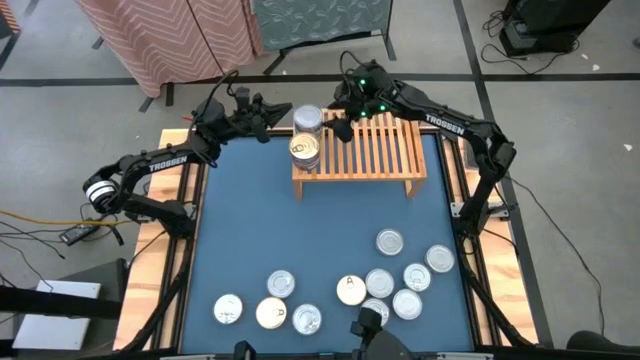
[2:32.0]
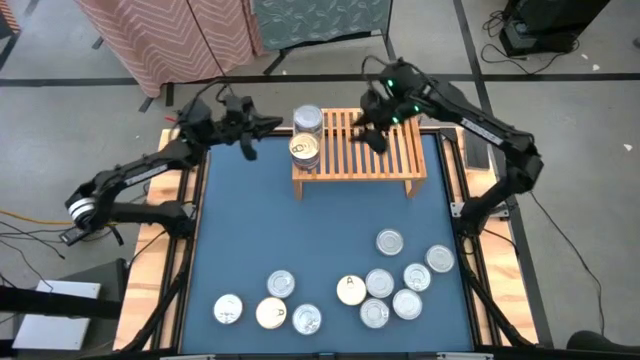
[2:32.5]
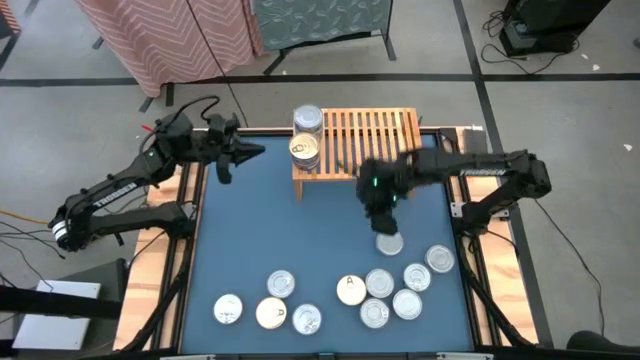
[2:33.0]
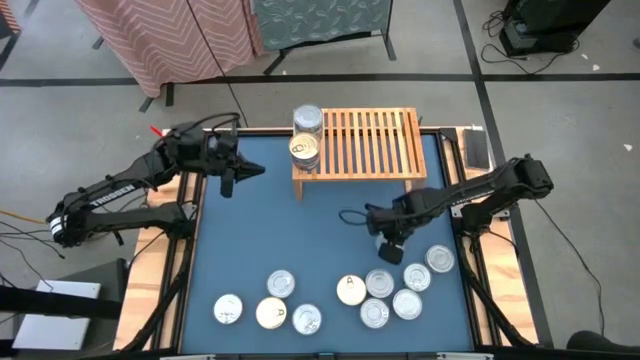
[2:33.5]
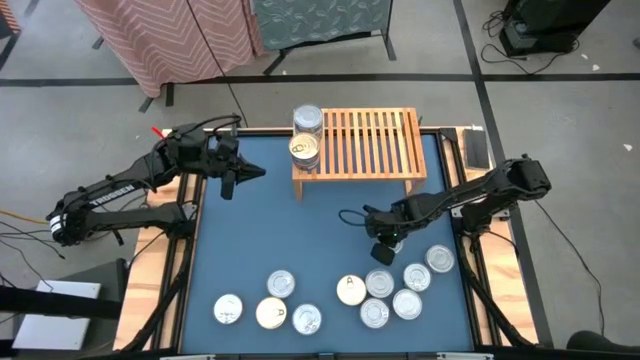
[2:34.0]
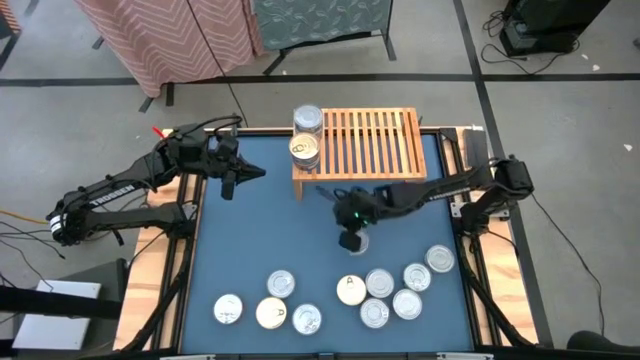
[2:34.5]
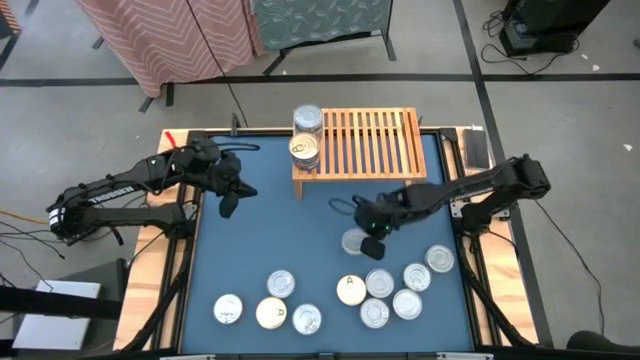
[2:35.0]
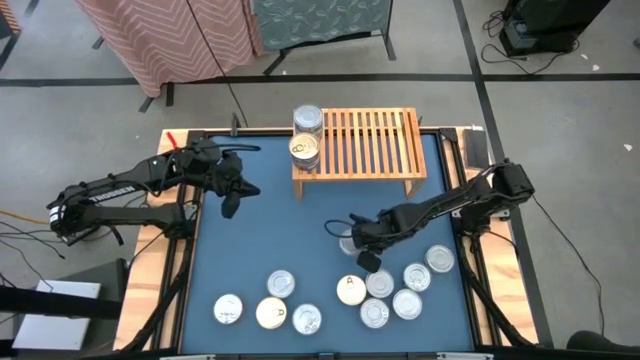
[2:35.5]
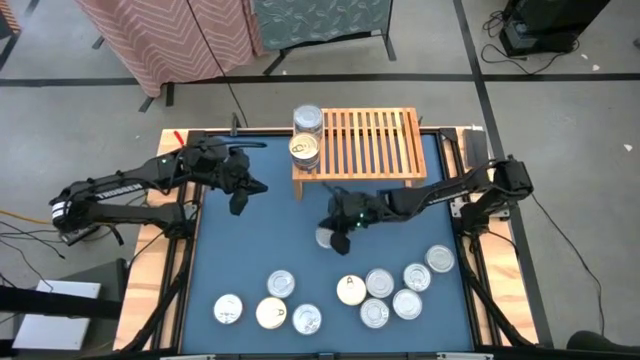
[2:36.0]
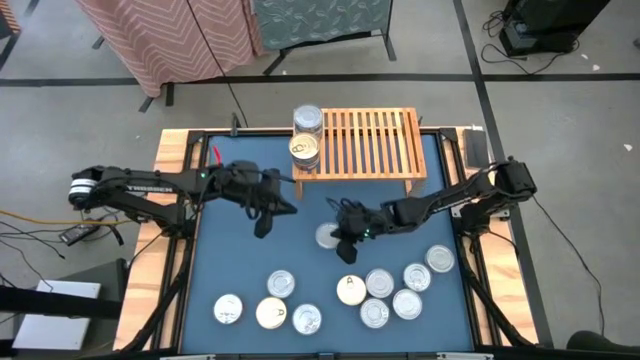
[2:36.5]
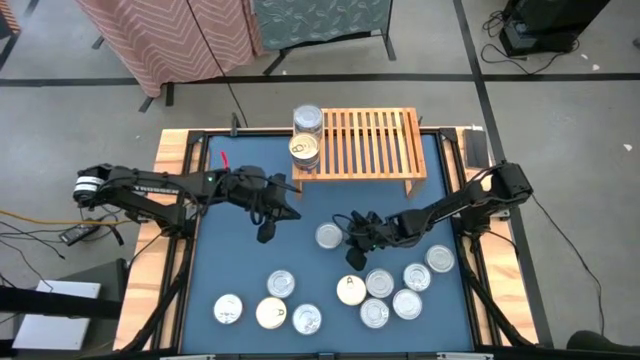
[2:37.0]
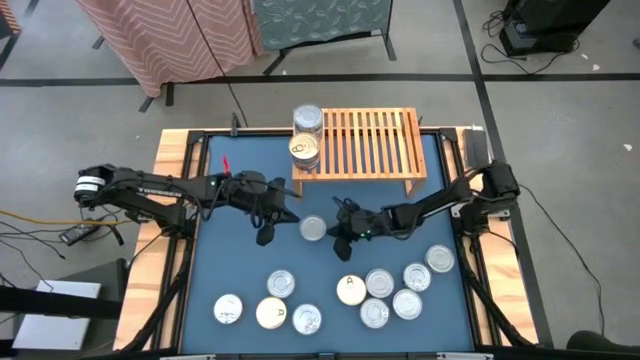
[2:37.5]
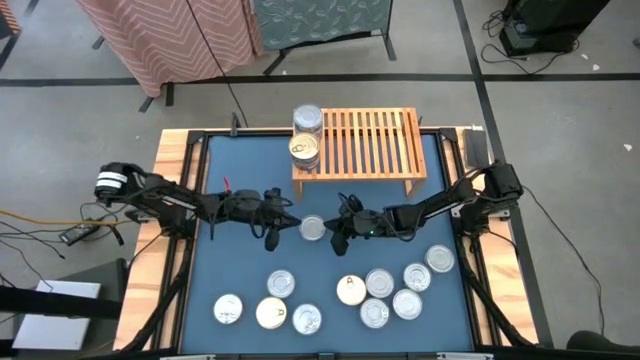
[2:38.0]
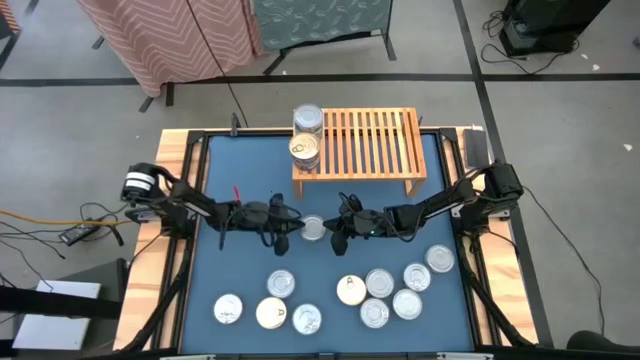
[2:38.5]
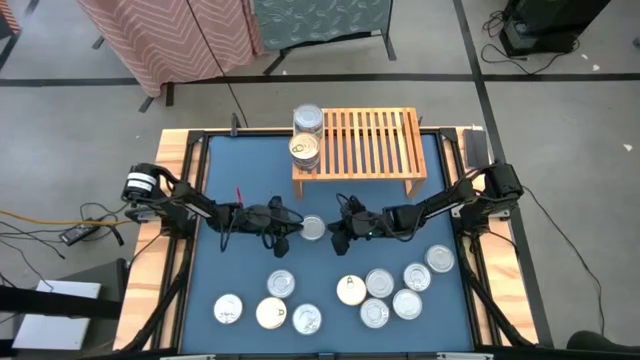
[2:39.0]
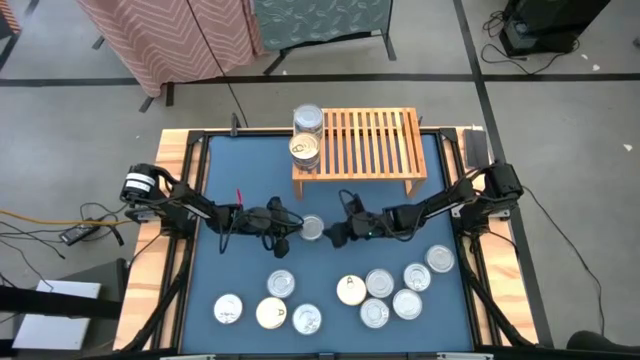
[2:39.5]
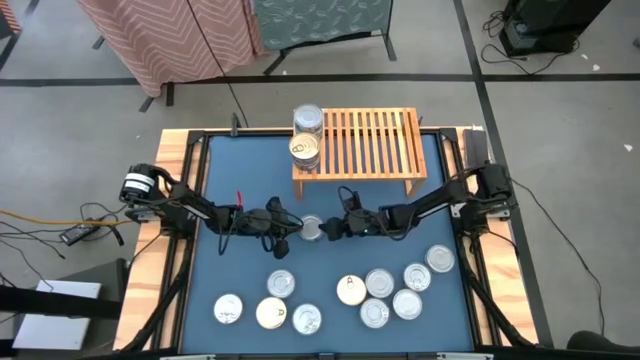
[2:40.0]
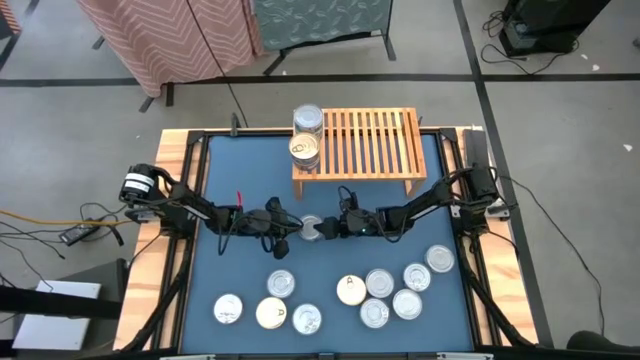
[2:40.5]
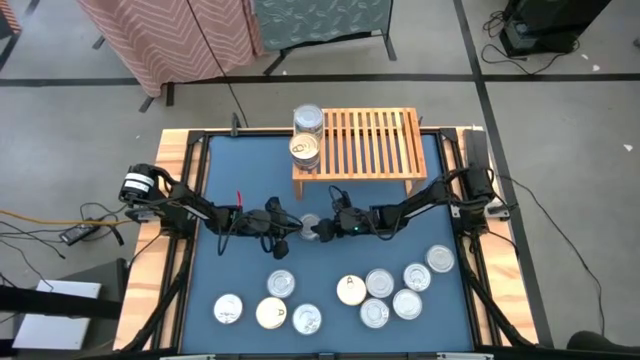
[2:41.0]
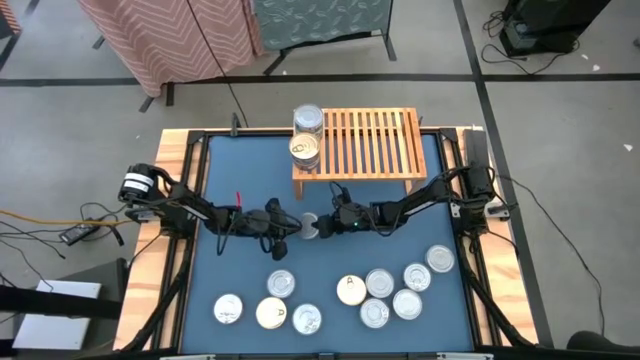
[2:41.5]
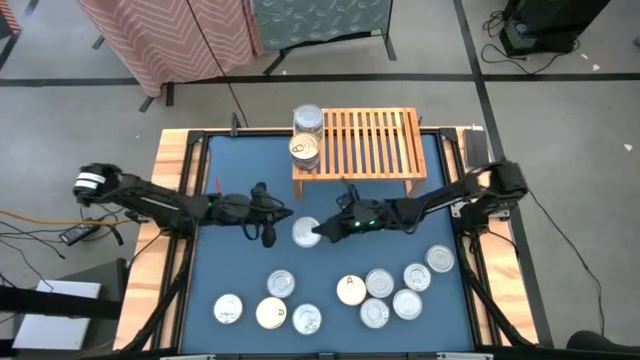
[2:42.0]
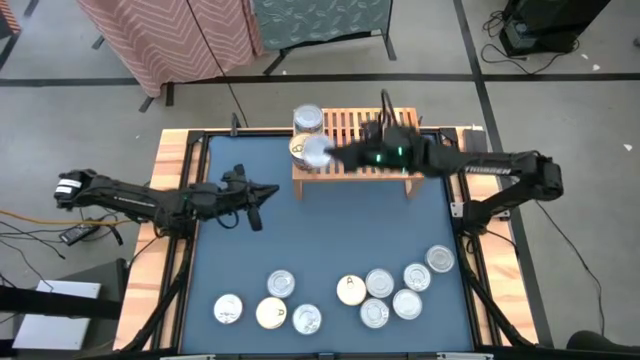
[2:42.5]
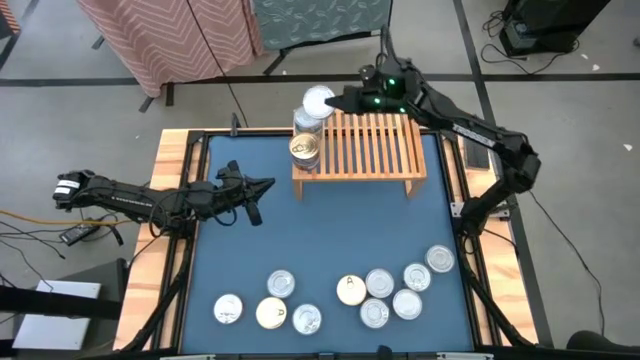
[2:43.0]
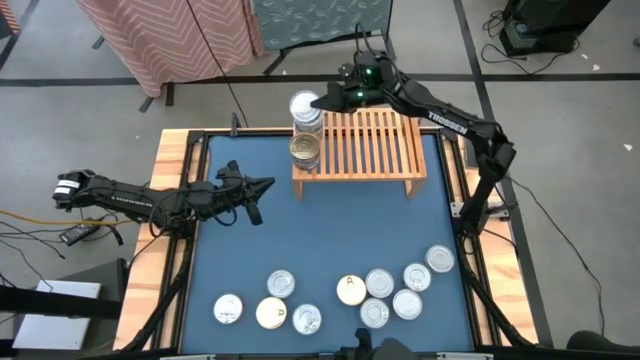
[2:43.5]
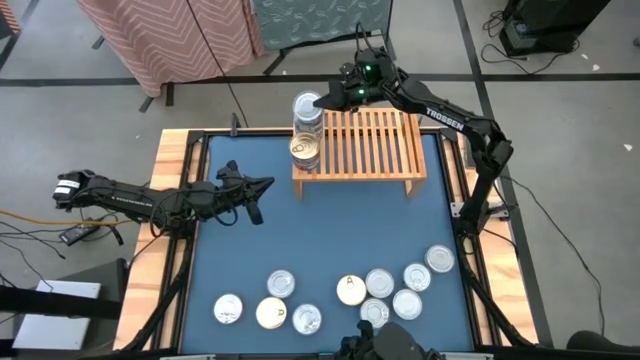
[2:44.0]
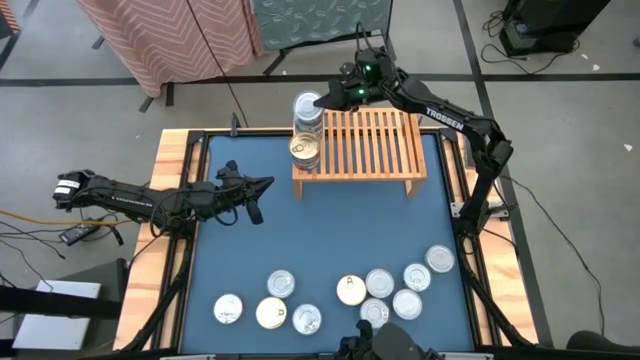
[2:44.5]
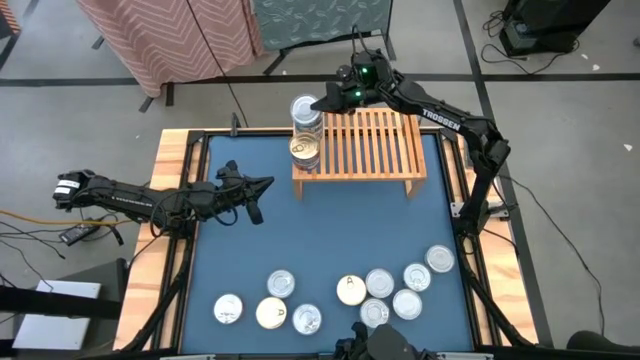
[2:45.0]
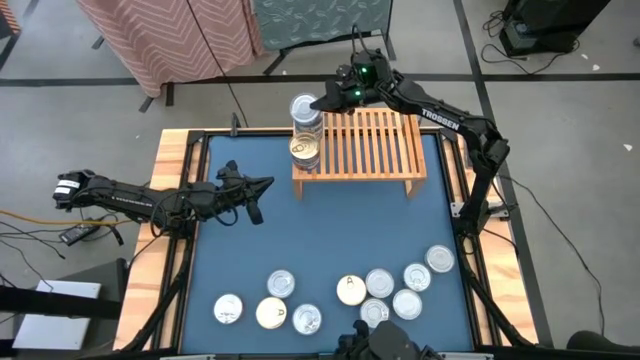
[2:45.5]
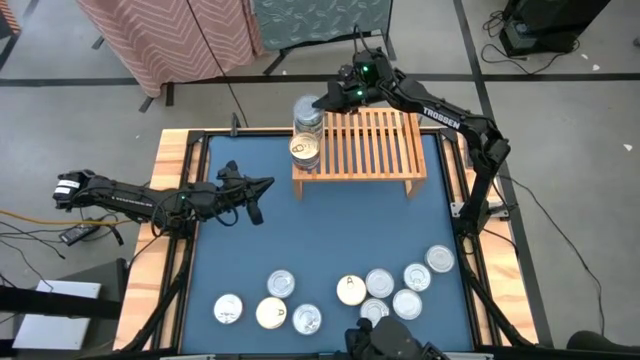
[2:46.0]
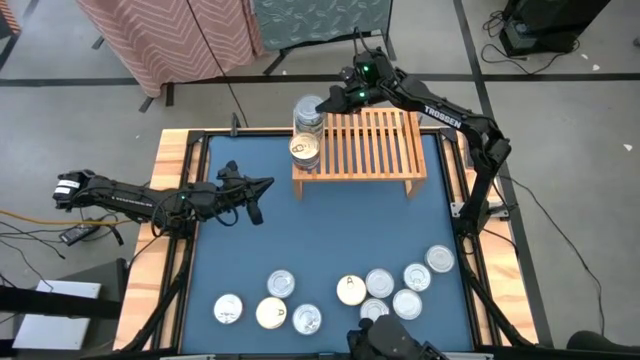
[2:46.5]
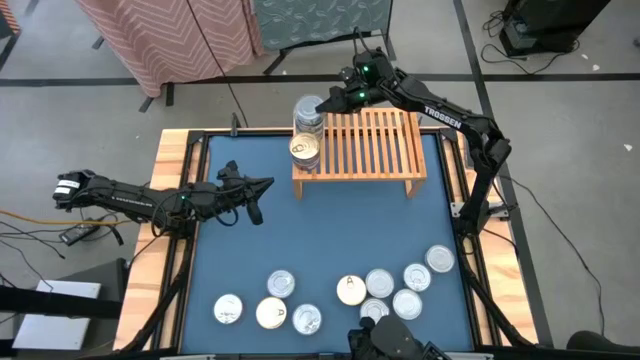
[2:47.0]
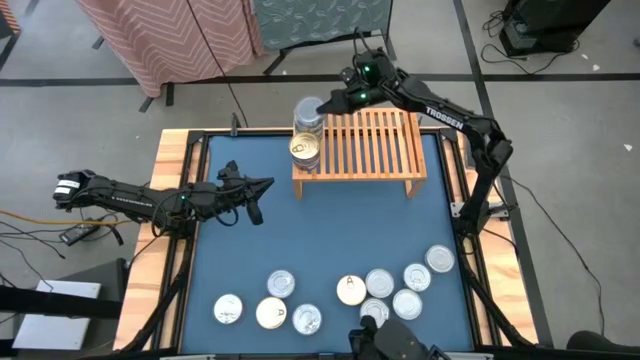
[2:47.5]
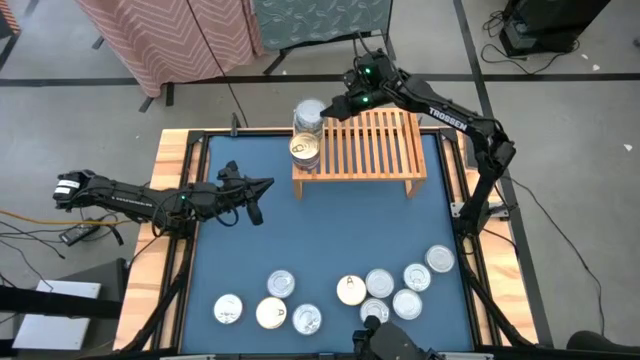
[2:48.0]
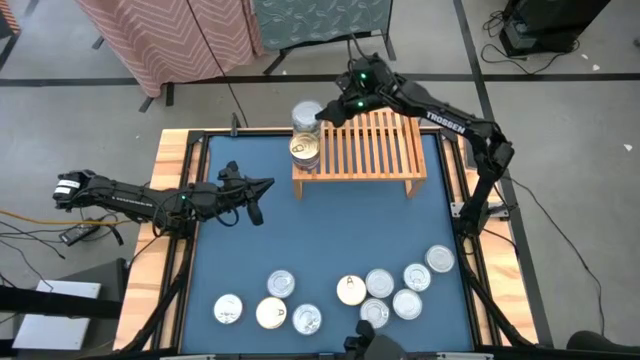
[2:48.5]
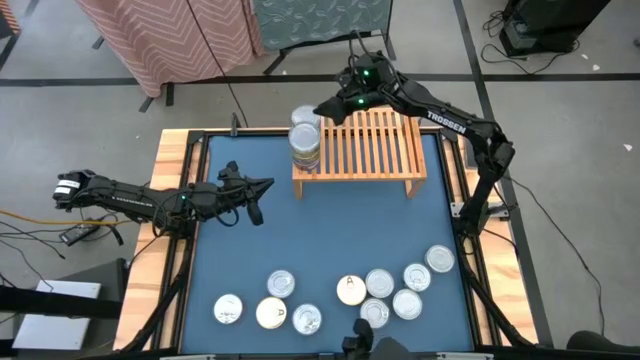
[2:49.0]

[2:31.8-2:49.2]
Task: Stack canned seafood by type on shelf
Stack the green tuna can on top of the other green tuna cans on the shelf

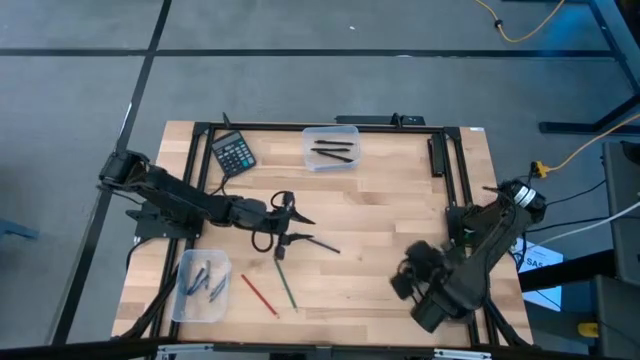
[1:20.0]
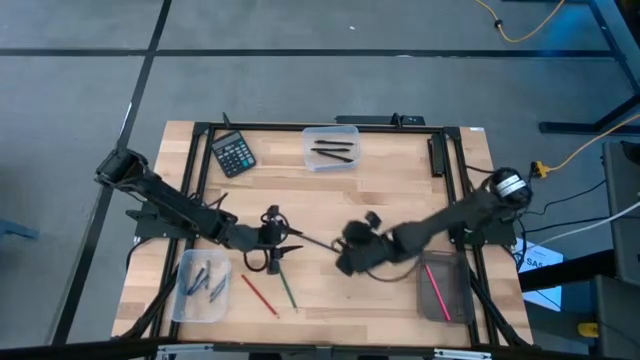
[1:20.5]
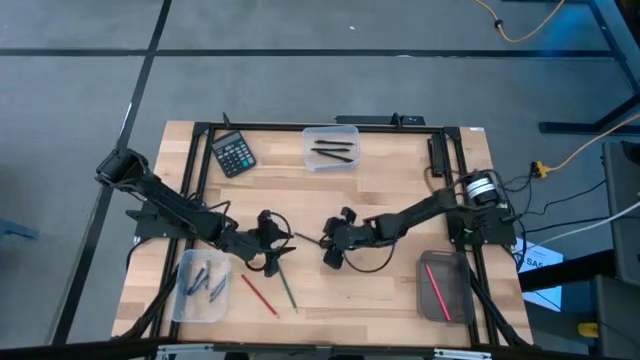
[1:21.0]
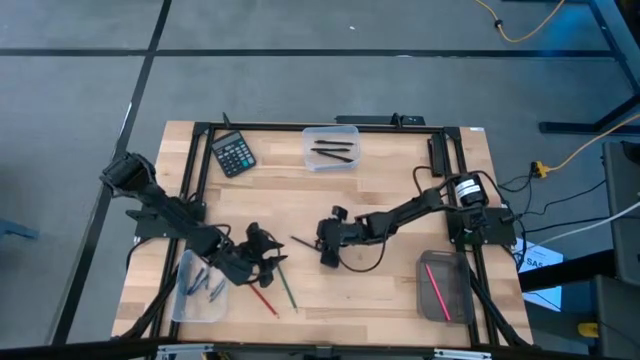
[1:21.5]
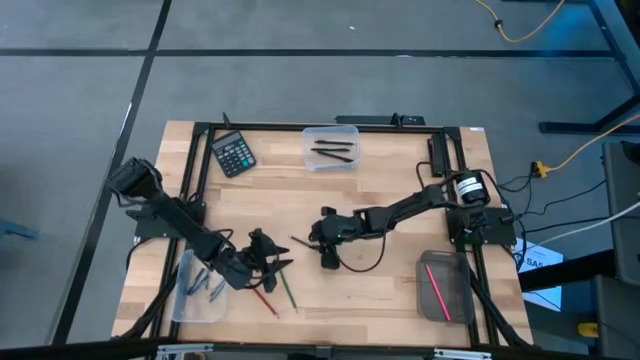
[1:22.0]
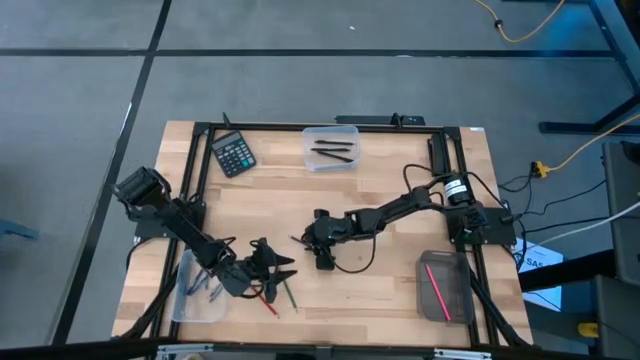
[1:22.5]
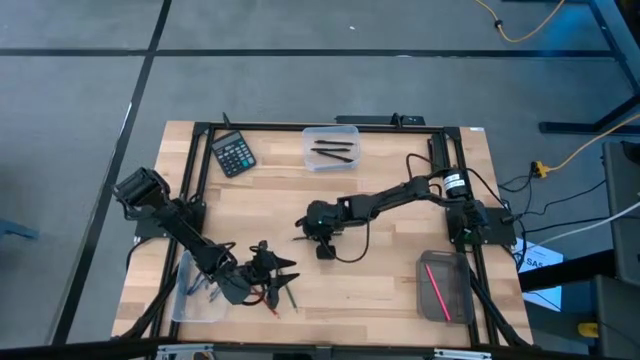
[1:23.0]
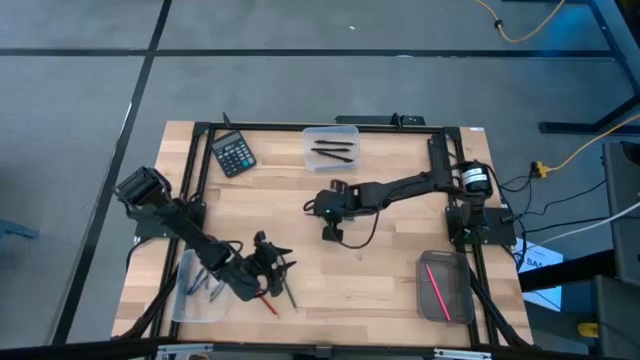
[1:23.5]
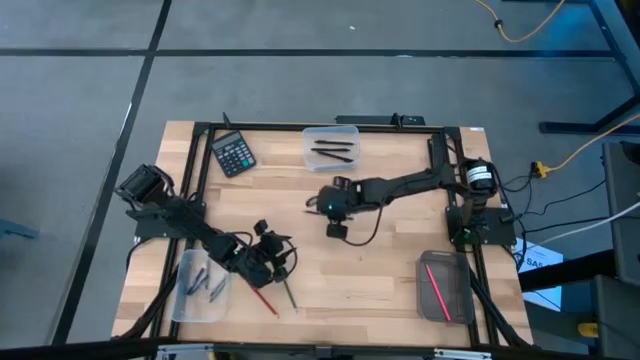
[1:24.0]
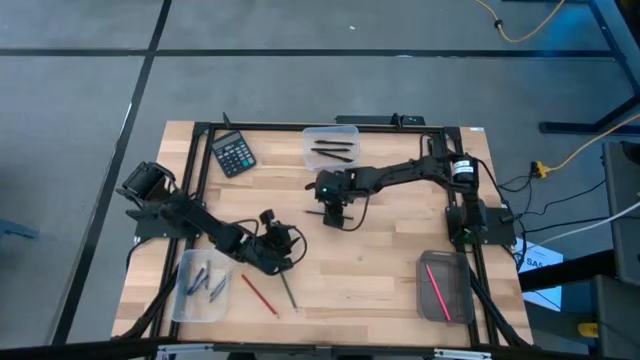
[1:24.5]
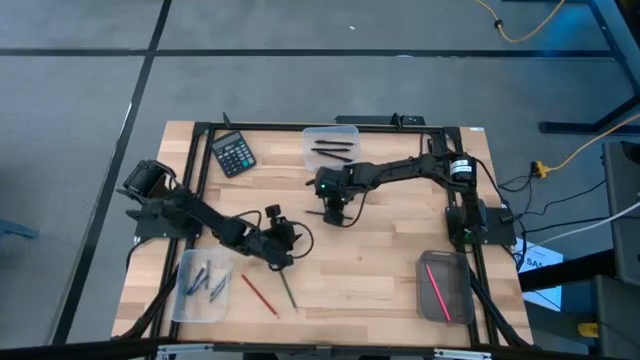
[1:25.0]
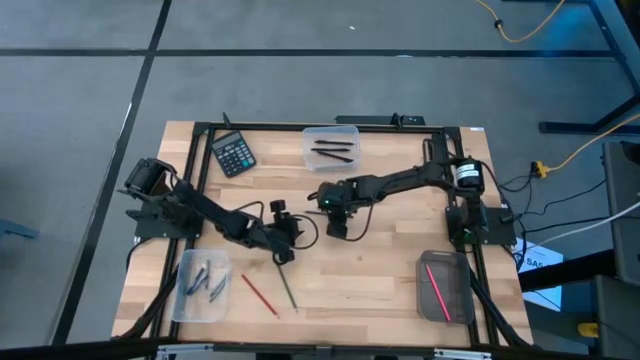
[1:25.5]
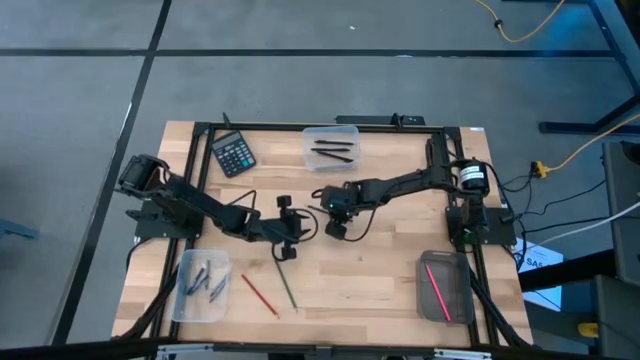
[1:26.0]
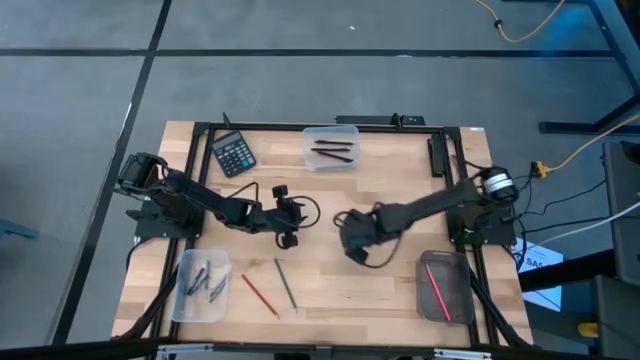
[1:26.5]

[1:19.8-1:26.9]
Task: Sort crayons/erasers/pens/pencils in bins
Put the blue color pencil into the black bin
